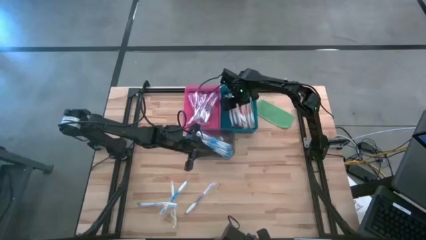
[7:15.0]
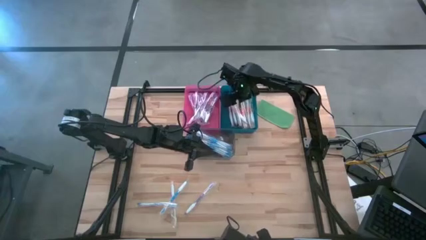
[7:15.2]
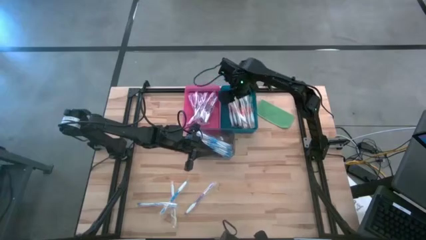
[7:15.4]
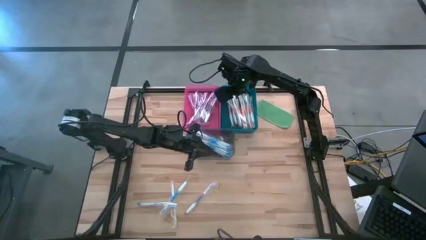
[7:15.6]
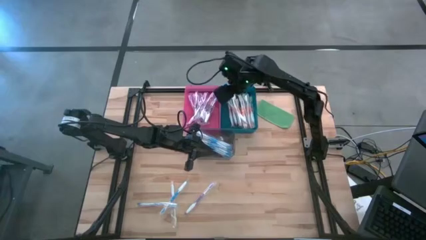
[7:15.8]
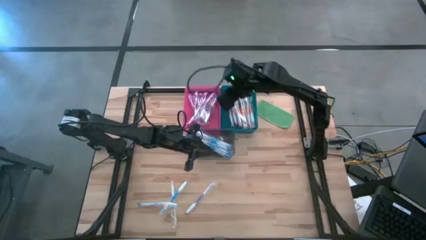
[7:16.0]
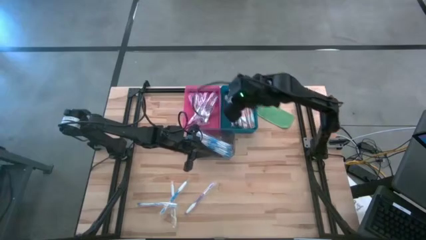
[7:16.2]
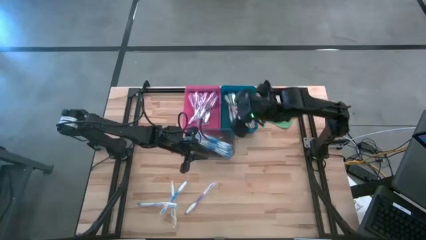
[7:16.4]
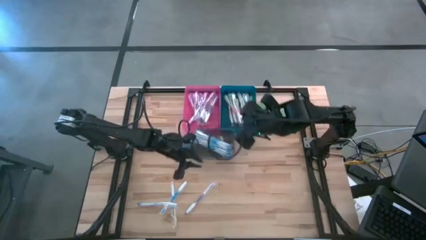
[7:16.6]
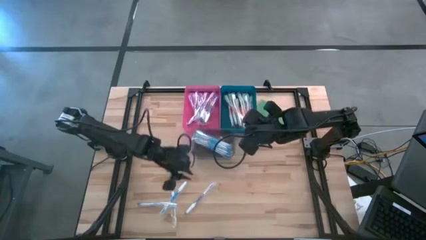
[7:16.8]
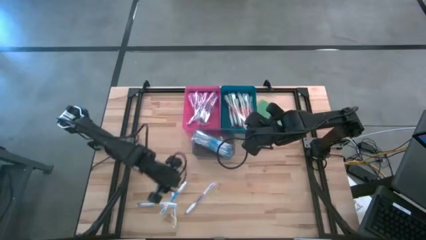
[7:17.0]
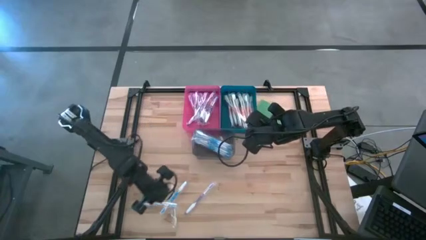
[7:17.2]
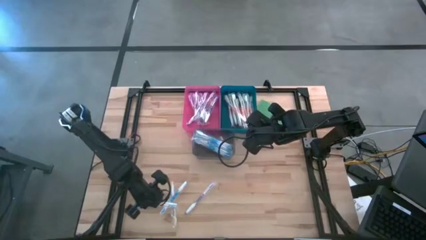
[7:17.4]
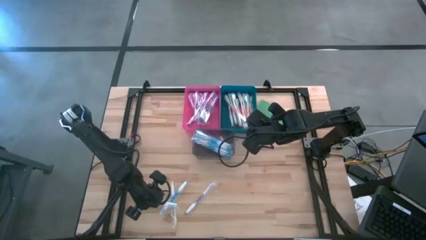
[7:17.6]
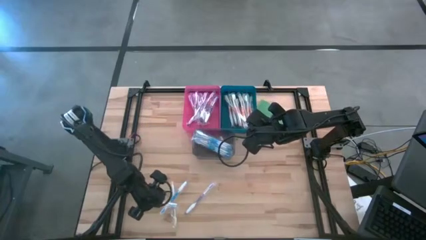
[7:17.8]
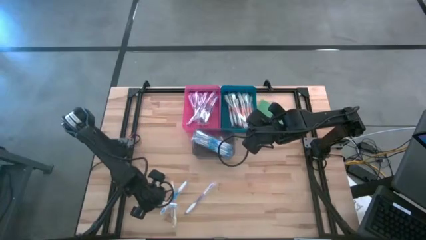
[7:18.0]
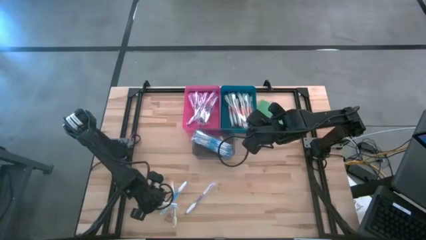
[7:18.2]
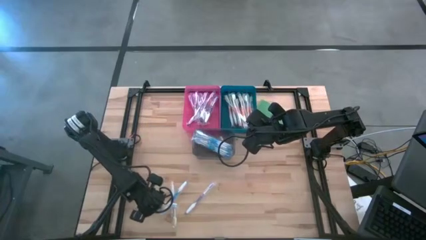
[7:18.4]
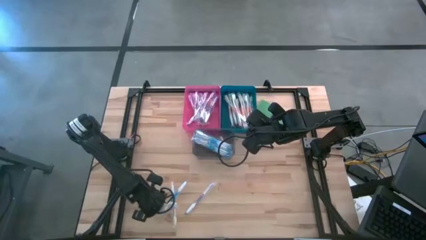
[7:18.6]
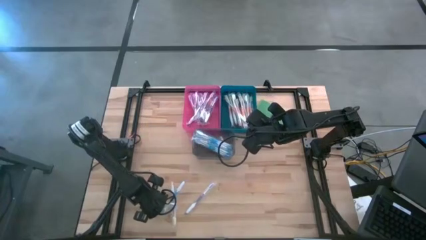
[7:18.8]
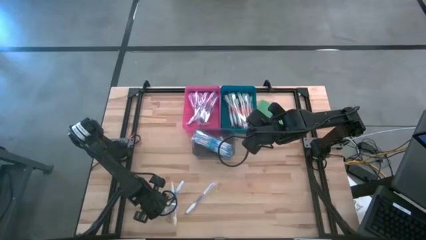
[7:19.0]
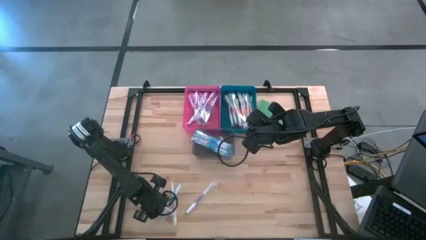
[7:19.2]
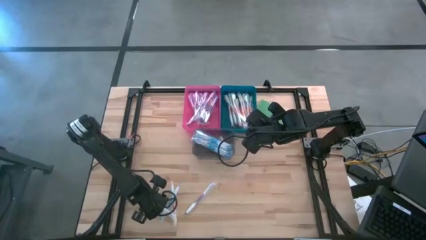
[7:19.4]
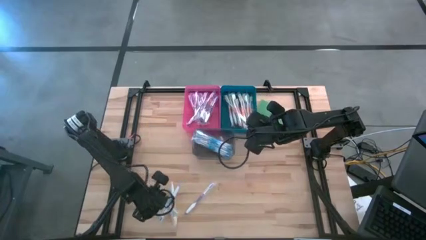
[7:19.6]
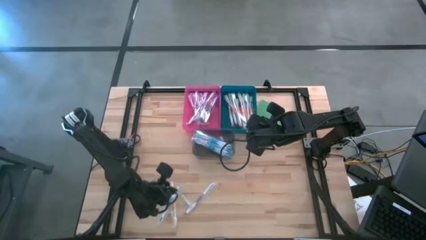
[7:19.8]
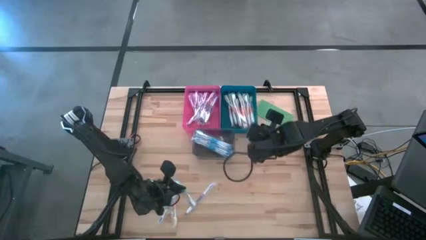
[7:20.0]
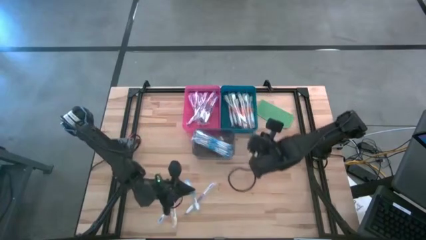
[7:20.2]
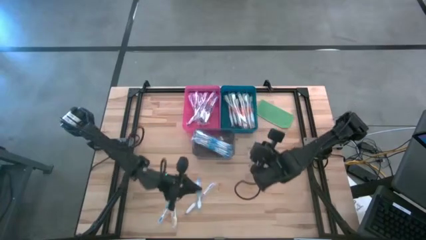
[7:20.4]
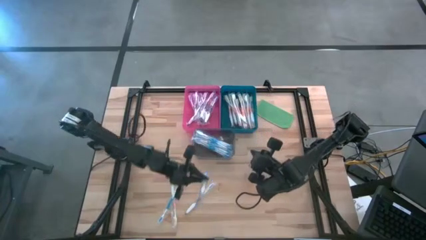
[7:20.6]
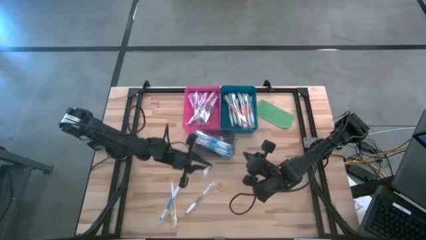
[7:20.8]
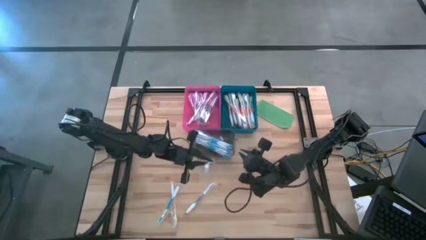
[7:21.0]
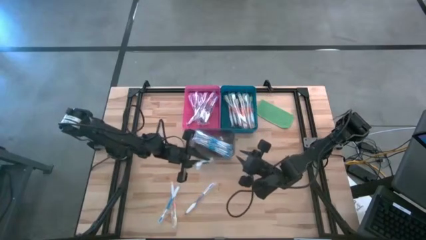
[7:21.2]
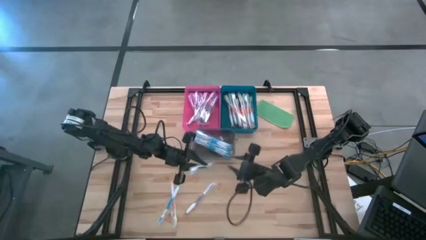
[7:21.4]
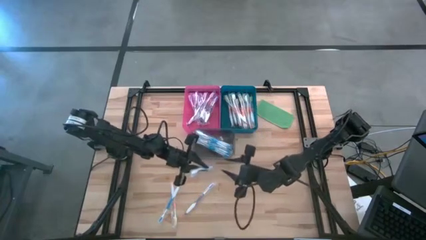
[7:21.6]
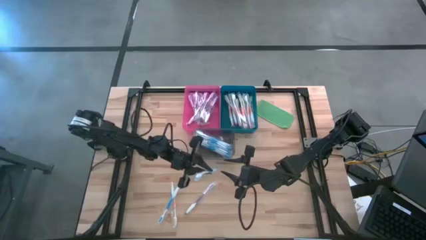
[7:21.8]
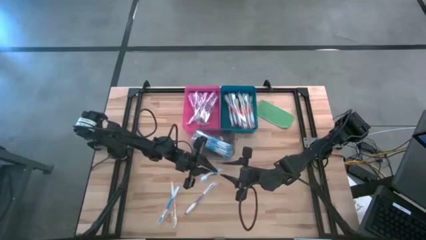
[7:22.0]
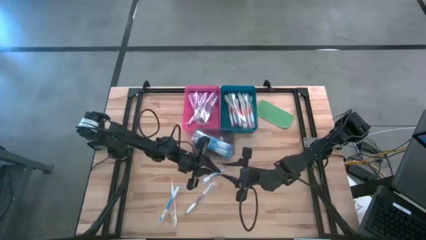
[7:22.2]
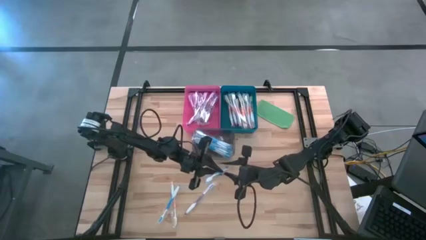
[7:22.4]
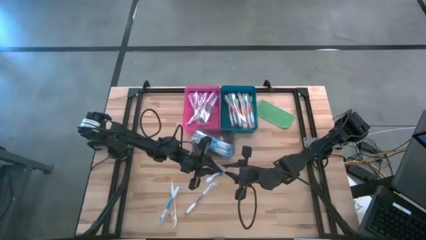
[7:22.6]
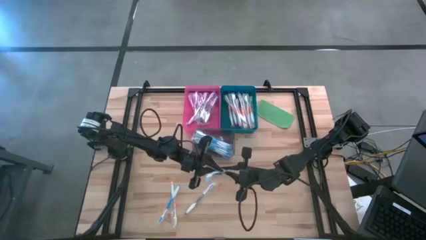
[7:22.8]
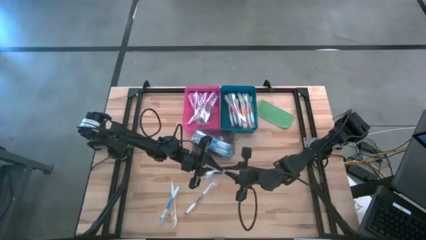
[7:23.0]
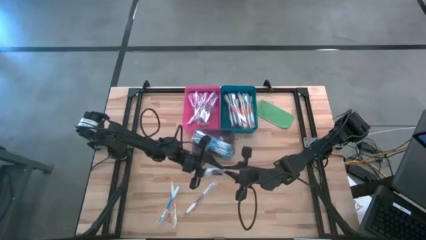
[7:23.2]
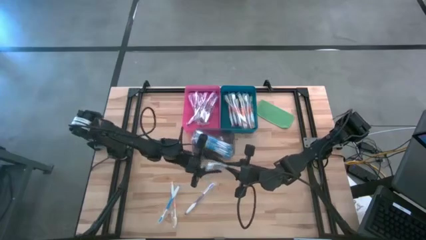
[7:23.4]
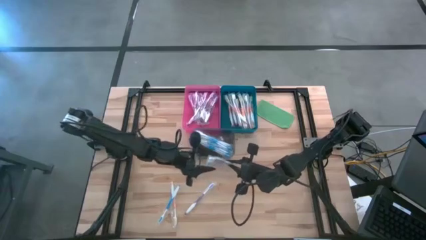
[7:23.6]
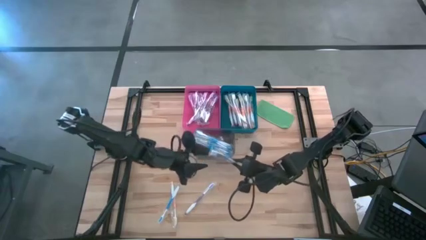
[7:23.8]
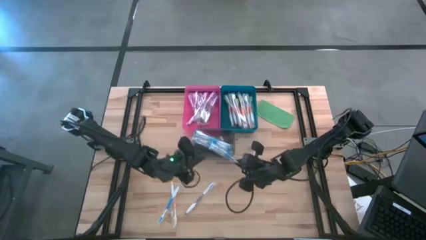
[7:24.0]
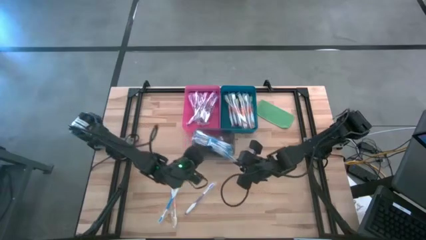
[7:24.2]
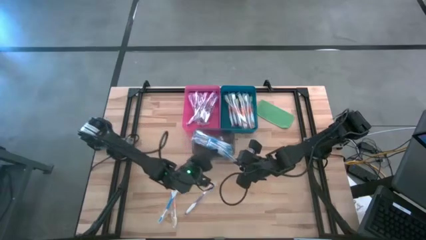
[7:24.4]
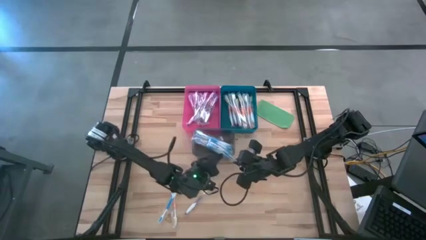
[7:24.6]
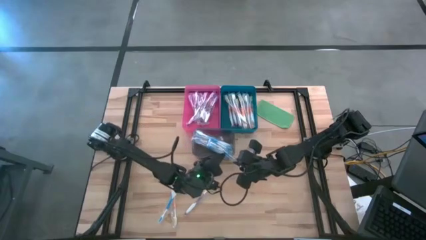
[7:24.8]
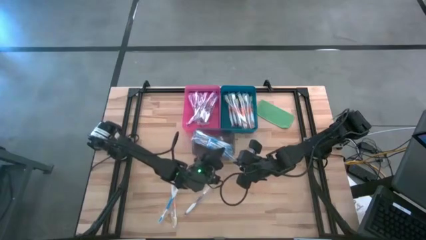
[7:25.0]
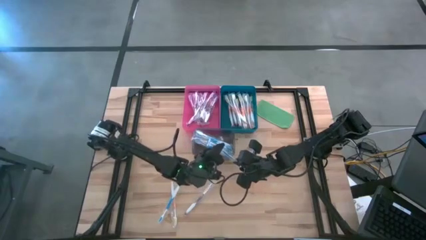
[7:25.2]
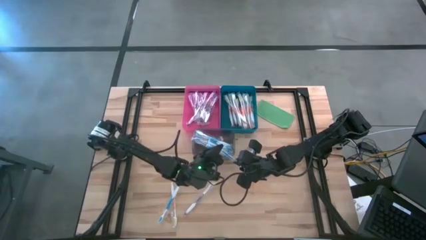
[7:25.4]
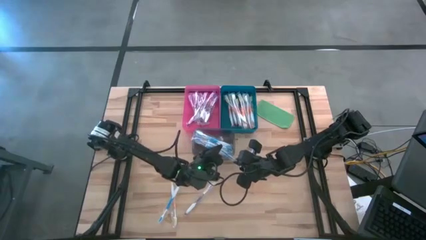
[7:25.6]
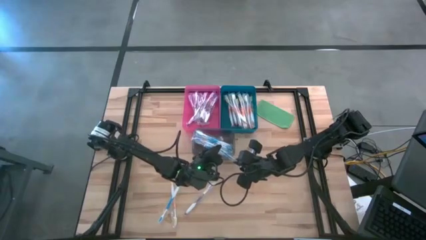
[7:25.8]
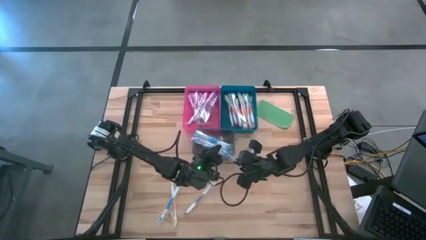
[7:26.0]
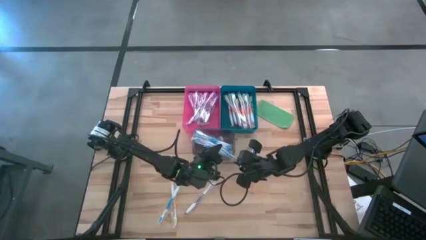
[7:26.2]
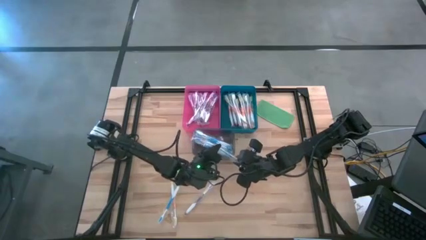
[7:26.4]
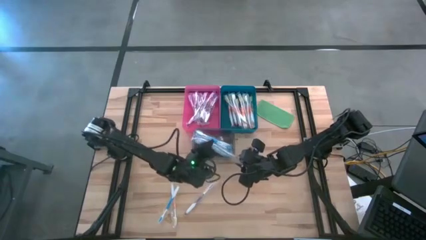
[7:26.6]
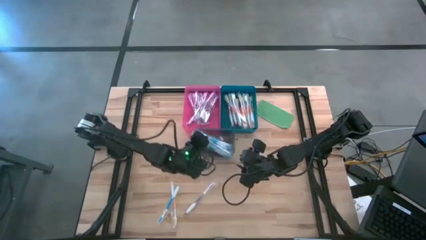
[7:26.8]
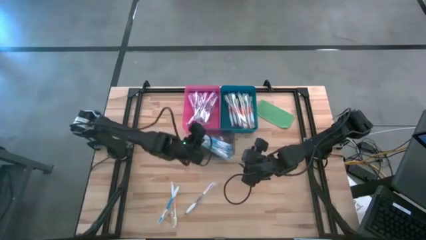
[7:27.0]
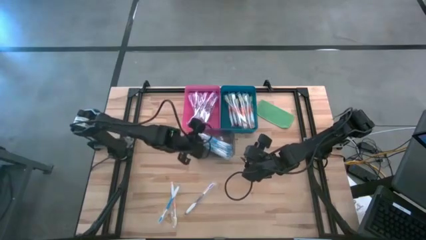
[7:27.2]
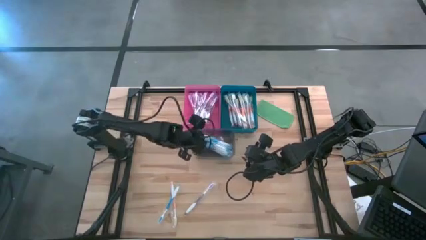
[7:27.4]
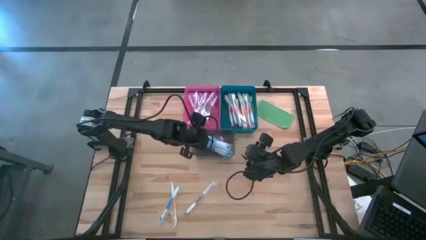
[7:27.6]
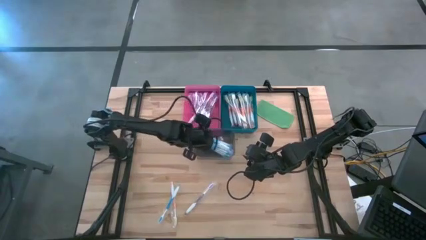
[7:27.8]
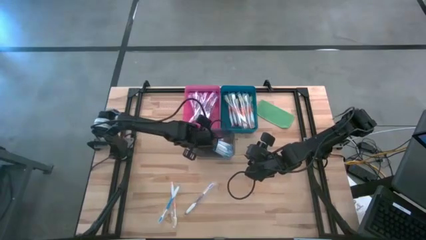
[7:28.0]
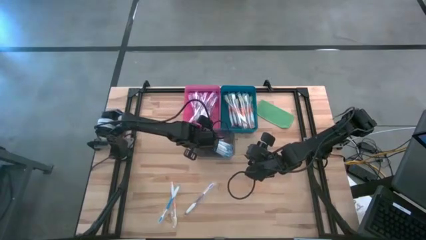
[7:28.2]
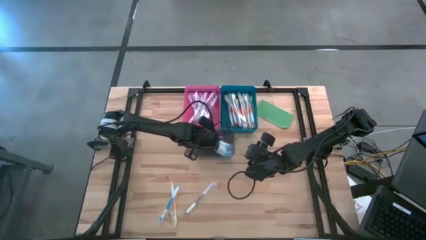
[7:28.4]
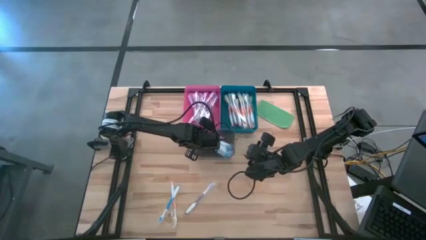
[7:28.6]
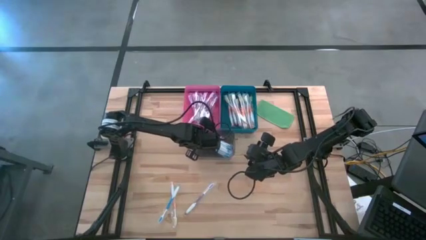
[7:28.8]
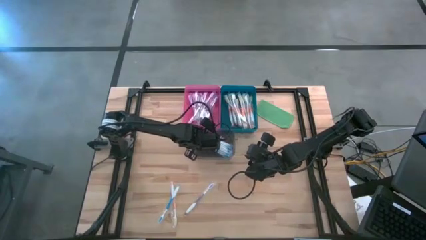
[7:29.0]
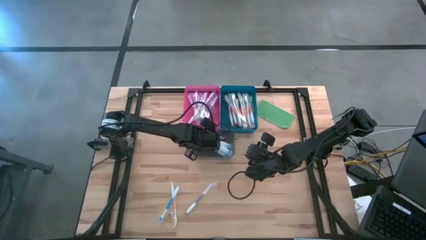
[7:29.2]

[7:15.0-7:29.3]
Task: Pick & Place Toothbrushes
Put the blue toothbrush into the transparent gray bin

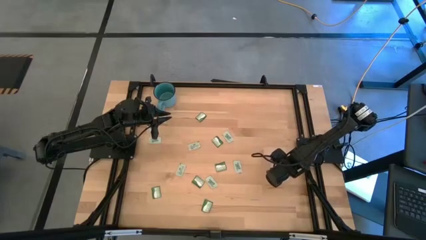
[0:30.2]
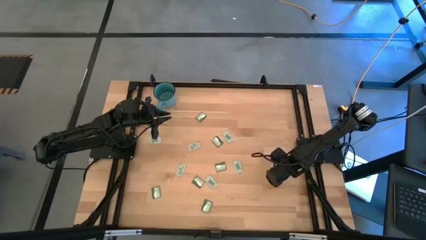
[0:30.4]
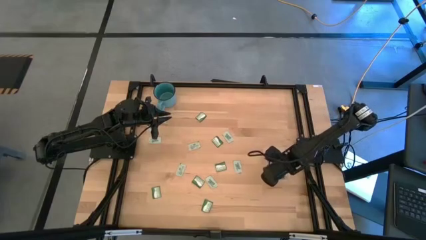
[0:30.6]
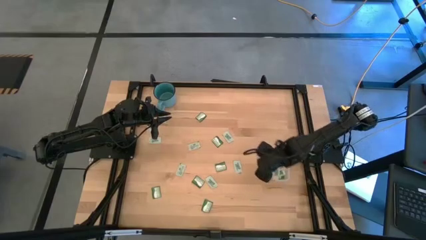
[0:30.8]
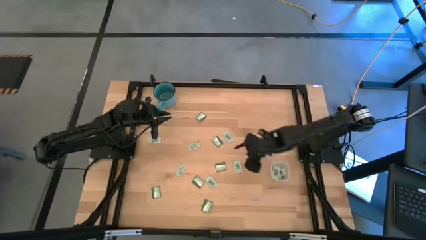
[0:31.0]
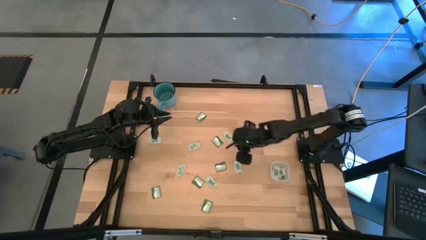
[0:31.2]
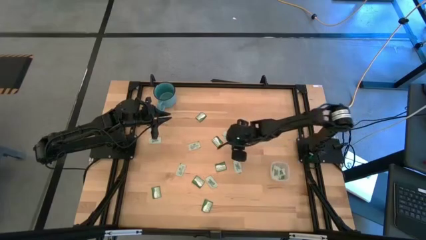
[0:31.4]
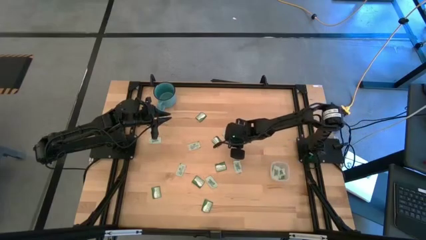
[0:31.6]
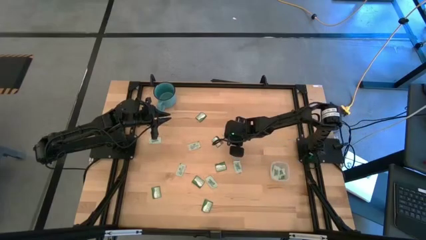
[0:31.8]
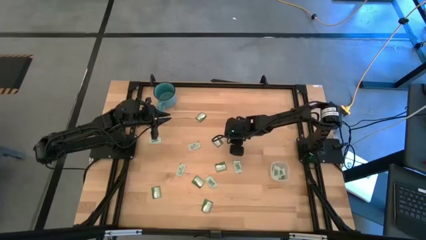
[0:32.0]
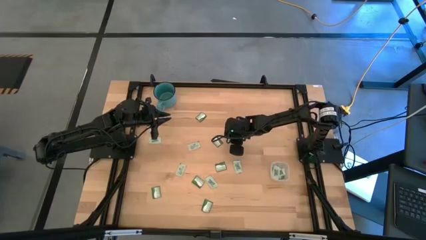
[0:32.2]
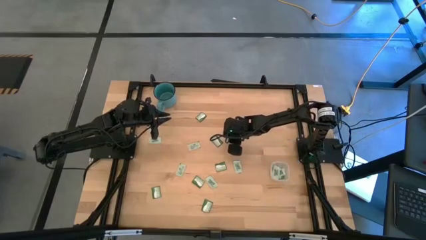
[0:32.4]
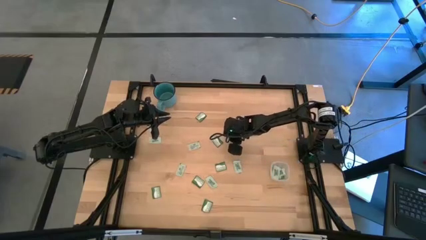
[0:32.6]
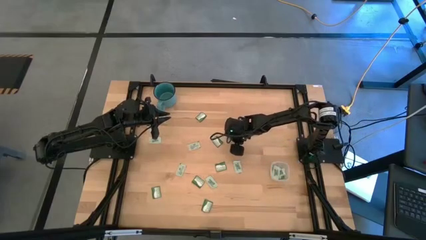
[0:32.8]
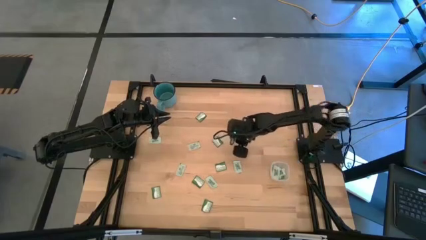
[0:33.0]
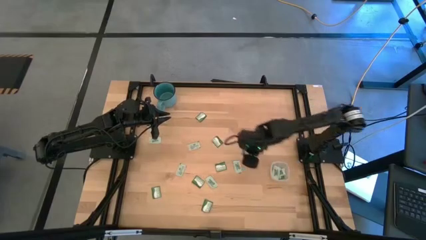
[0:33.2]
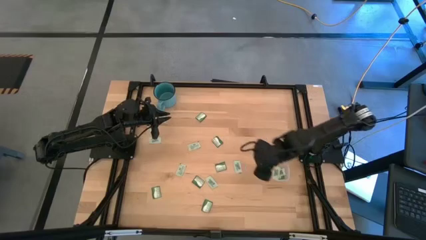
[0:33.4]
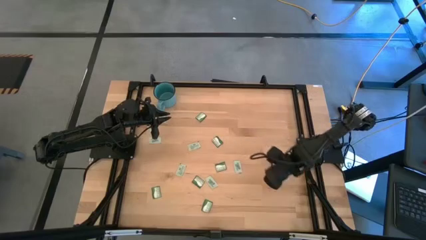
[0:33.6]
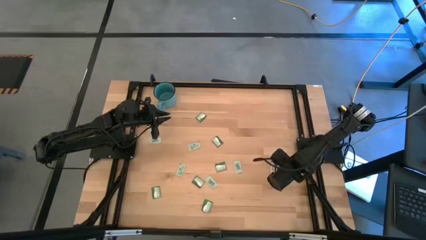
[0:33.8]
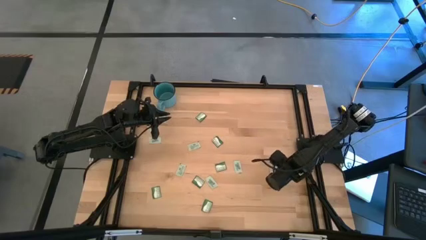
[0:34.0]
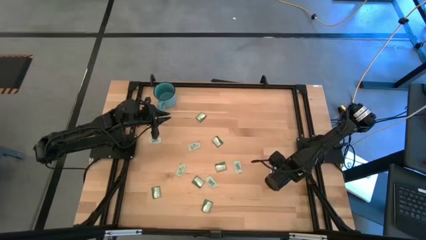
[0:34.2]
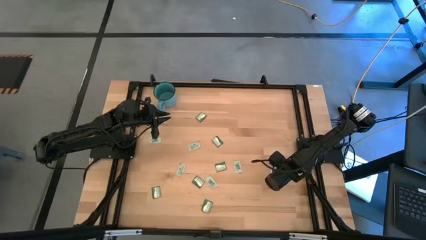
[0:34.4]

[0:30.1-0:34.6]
Task: Pick and place items into bin
Put the white stevia packet into the transparent bin
